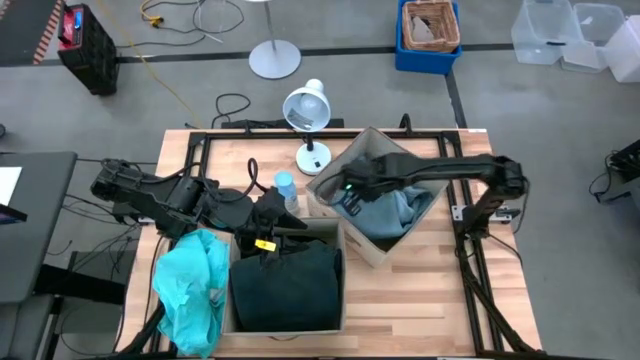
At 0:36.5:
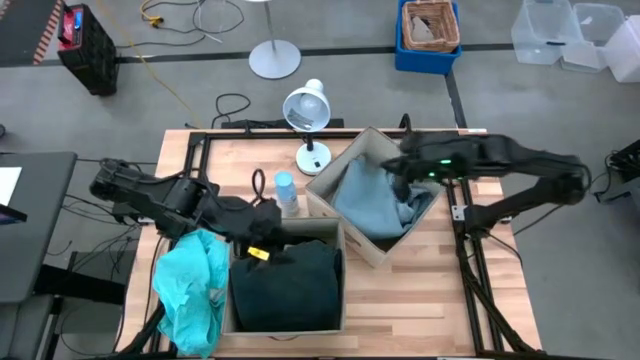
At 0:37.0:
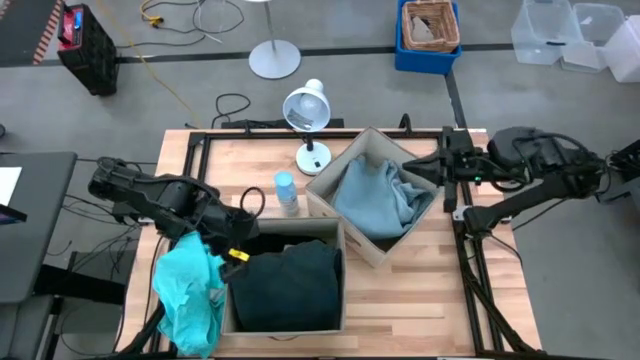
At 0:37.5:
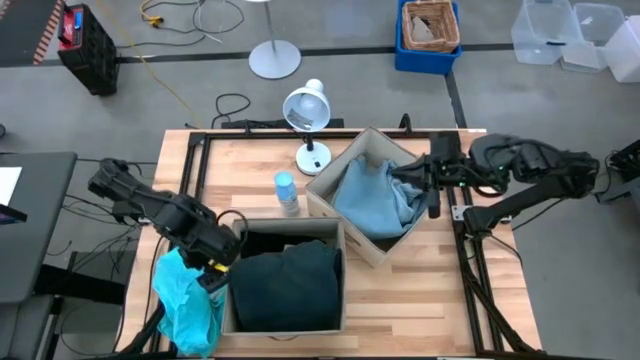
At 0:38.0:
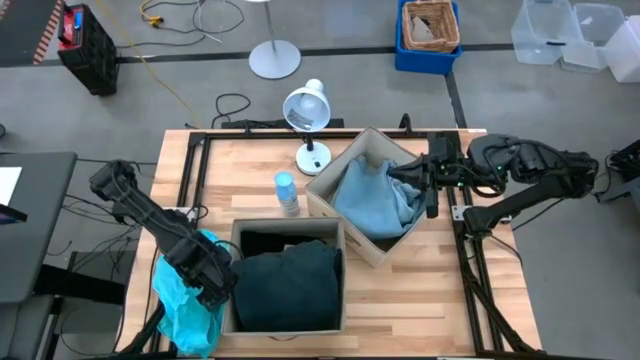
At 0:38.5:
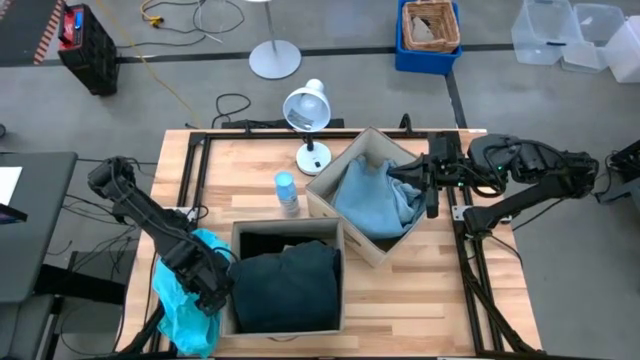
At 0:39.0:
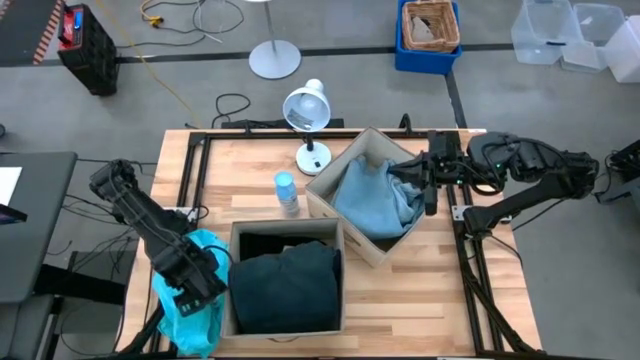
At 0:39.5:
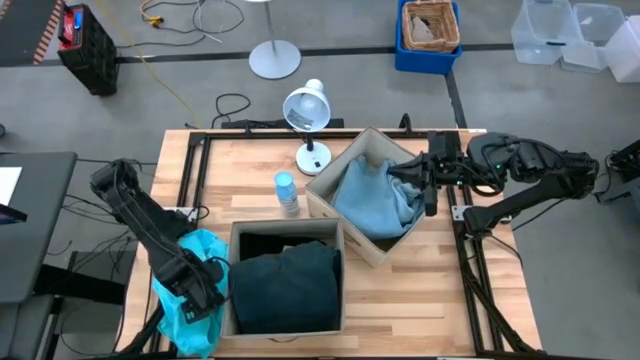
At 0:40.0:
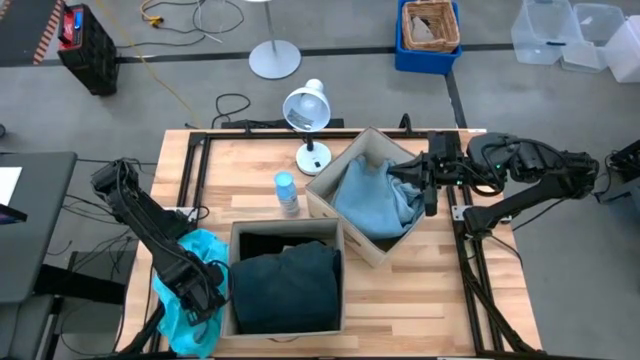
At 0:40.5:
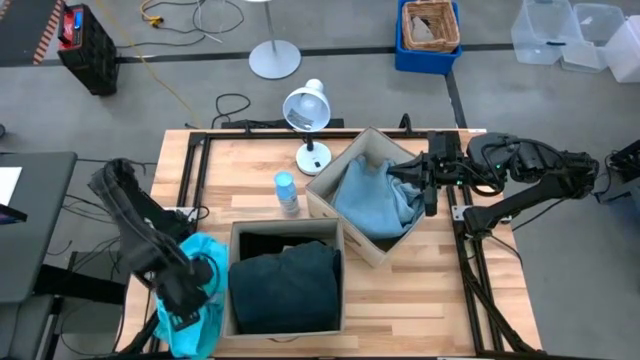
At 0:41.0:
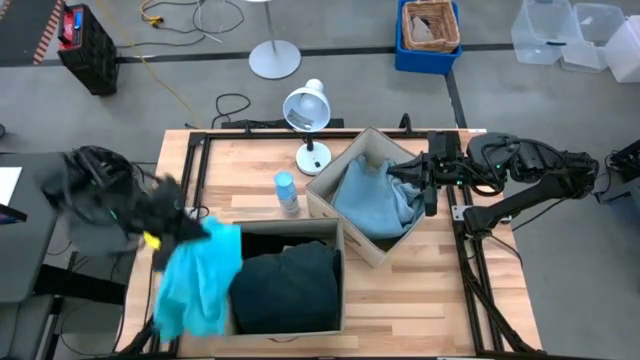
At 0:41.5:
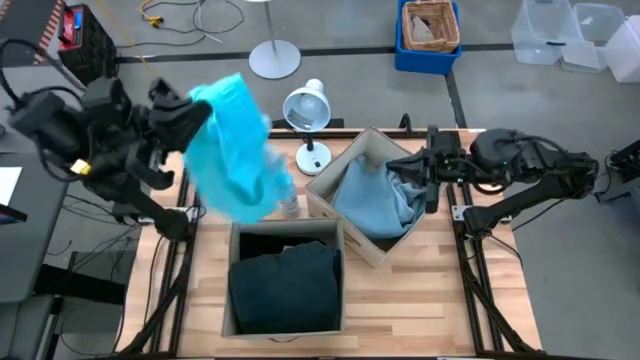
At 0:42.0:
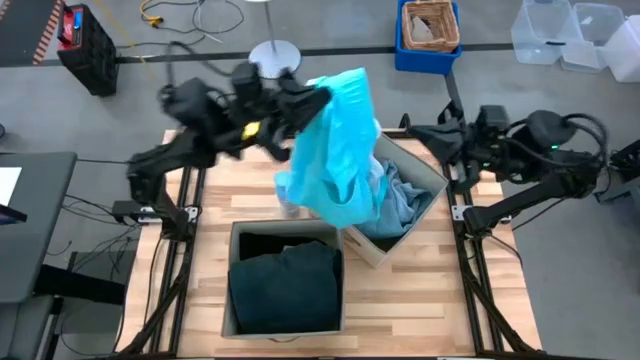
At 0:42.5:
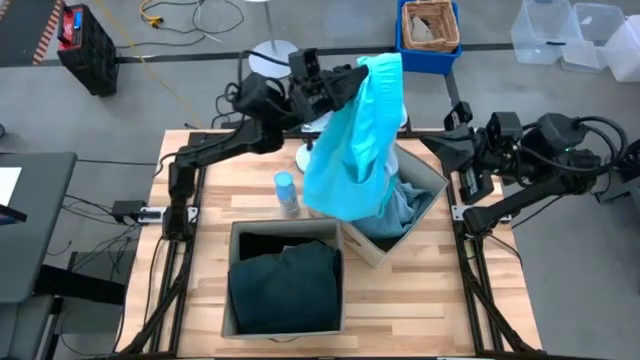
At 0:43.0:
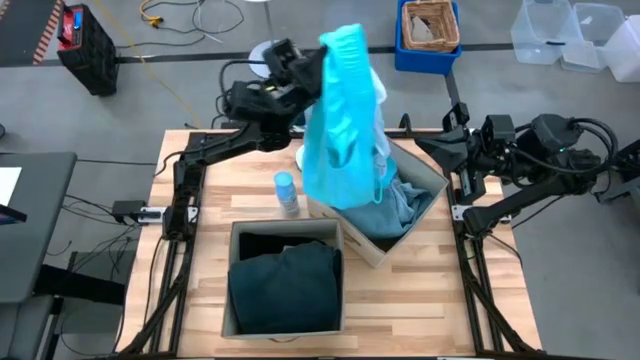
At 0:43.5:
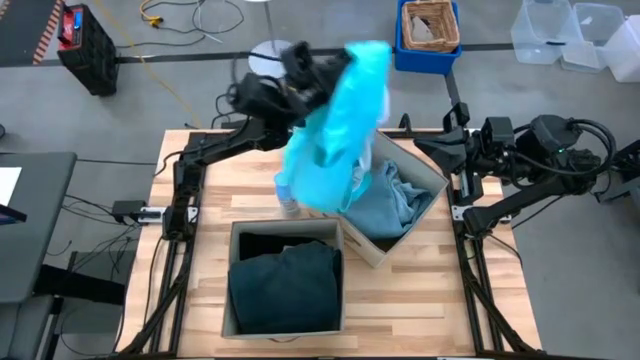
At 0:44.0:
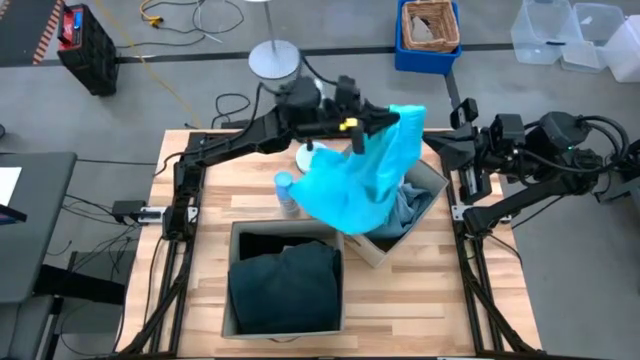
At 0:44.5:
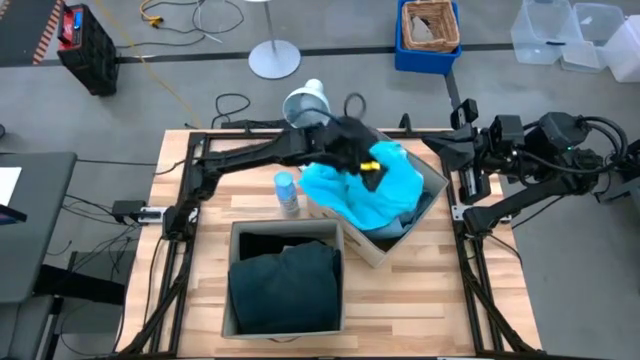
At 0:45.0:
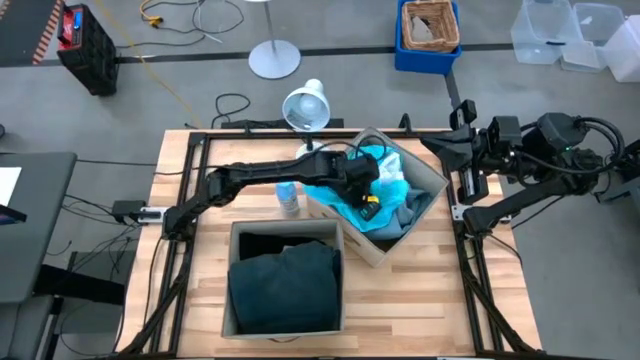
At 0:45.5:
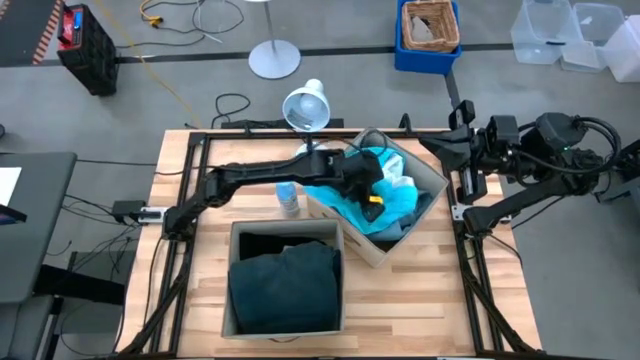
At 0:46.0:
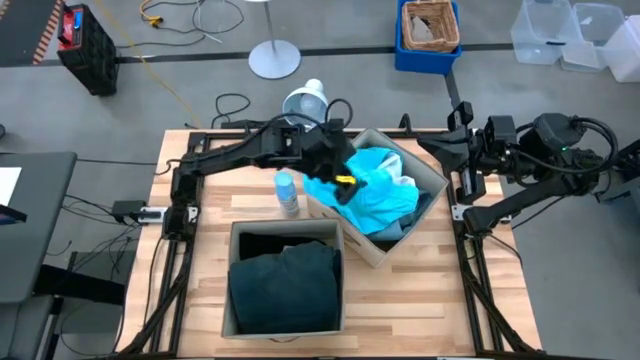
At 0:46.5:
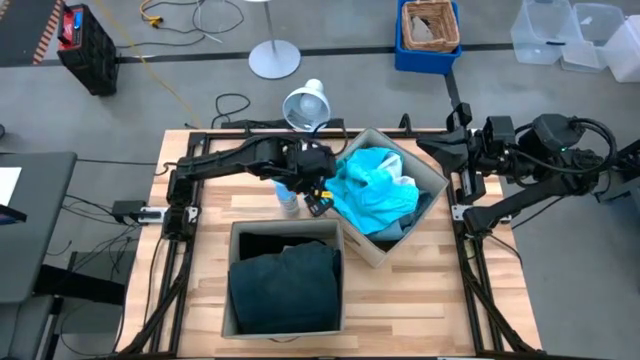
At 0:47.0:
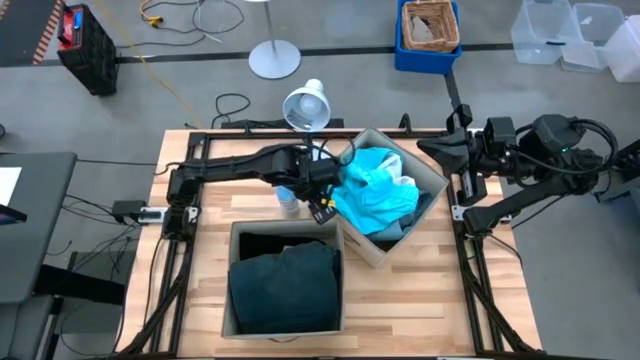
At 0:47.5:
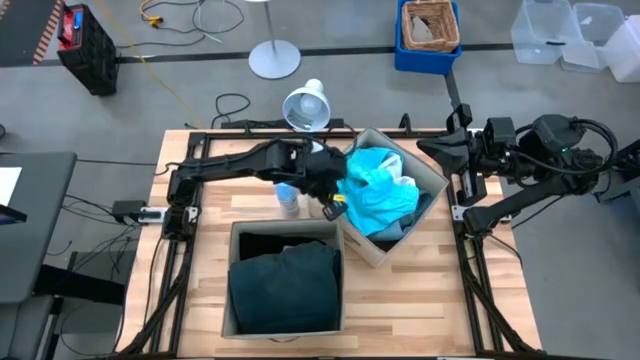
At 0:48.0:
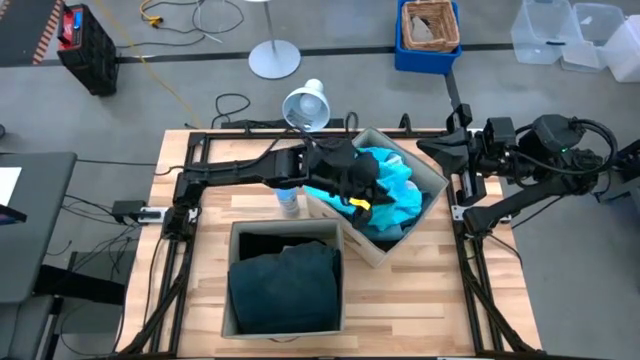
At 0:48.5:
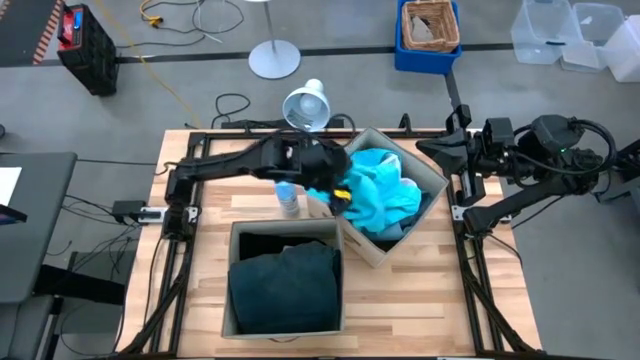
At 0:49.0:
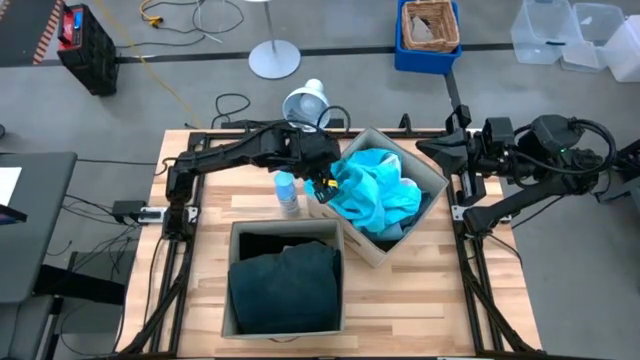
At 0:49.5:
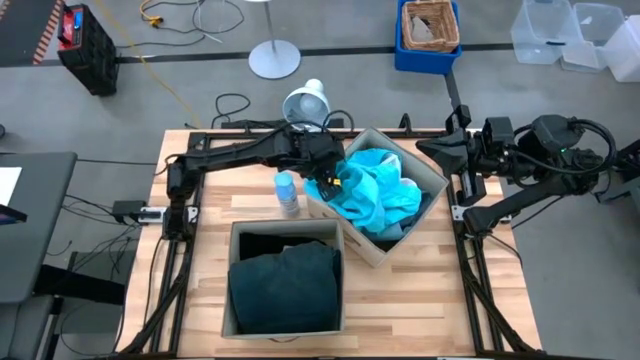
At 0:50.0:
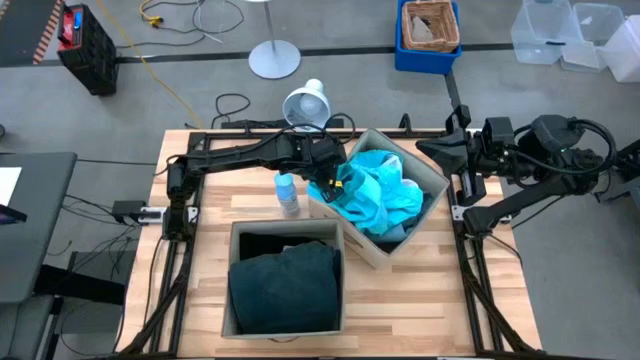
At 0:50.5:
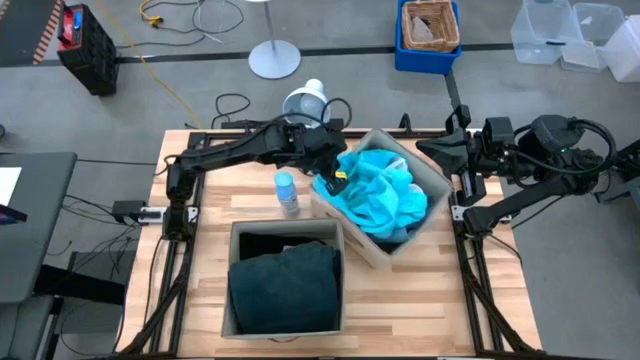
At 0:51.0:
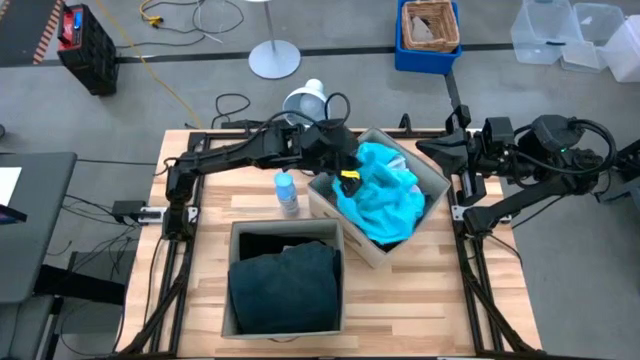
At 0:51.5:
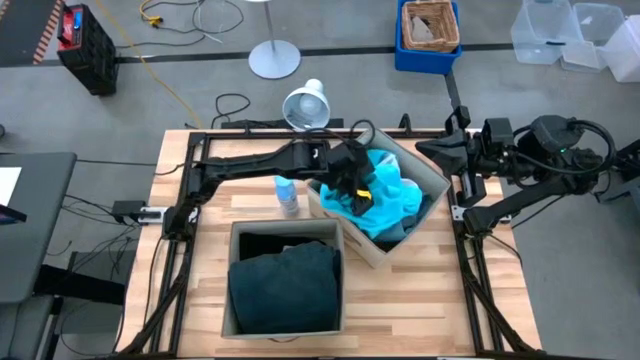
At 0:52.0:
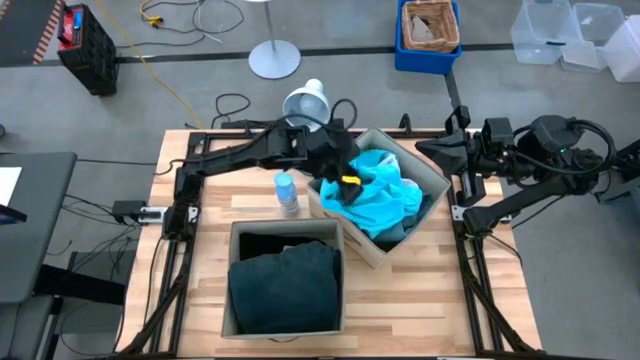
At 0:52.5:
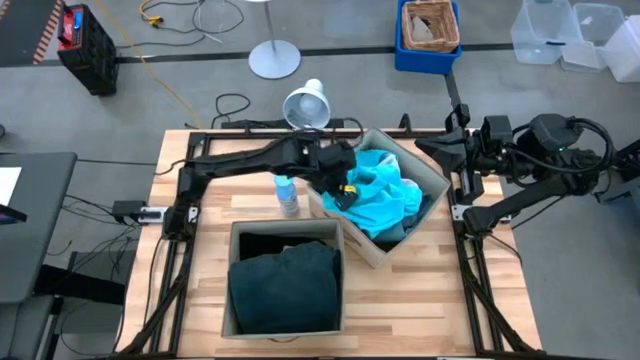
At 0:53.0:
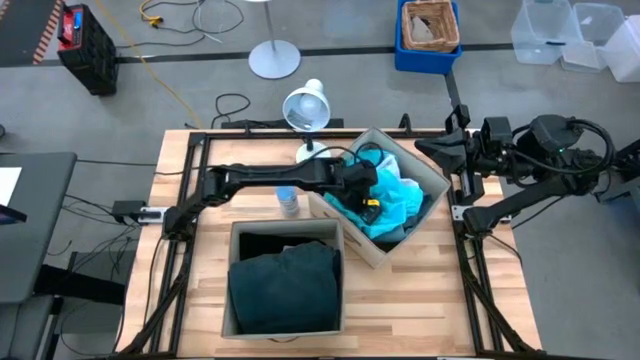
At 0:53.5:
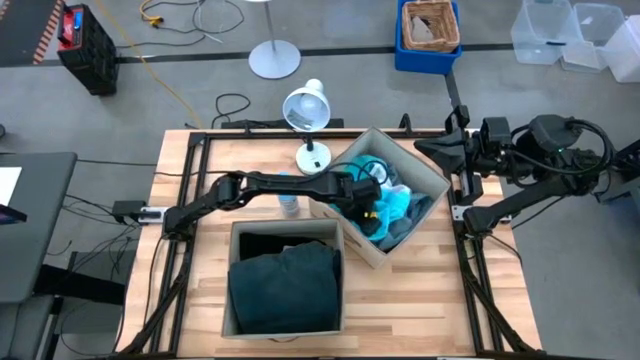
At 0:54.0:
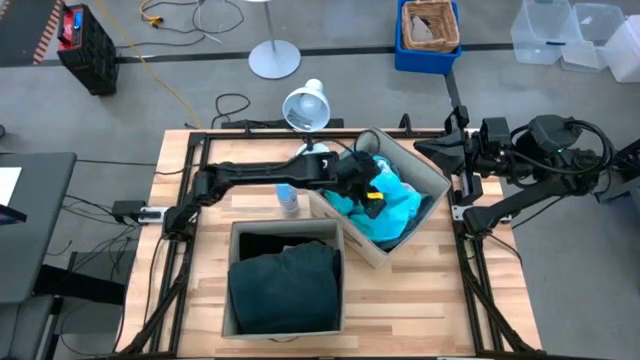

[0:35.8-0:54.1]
Task: Sort clothes
Put the blue shorts into the top laundry bin

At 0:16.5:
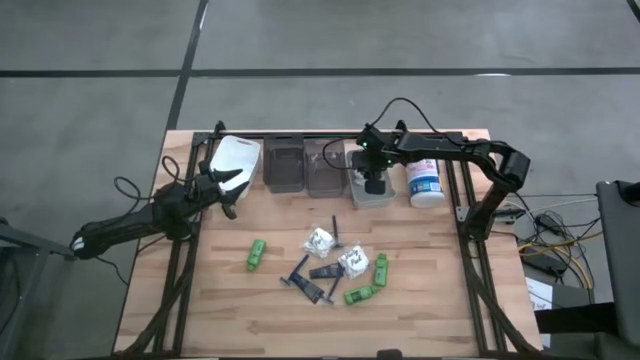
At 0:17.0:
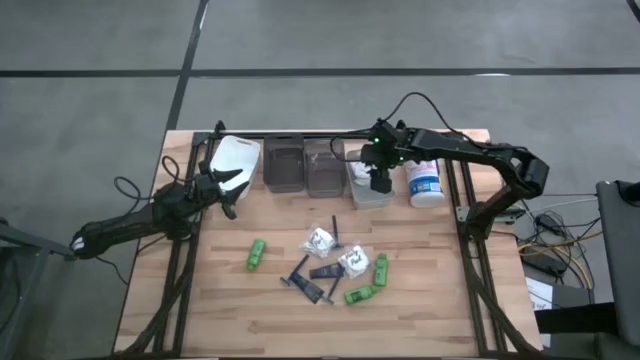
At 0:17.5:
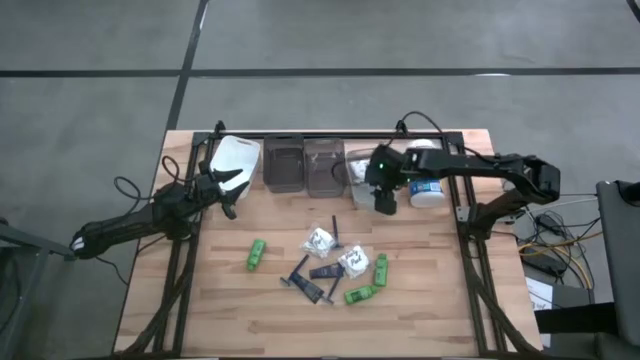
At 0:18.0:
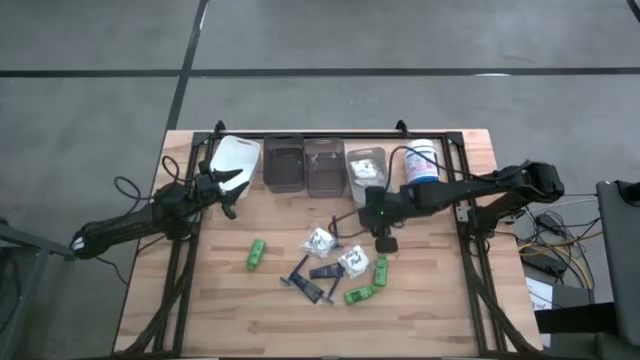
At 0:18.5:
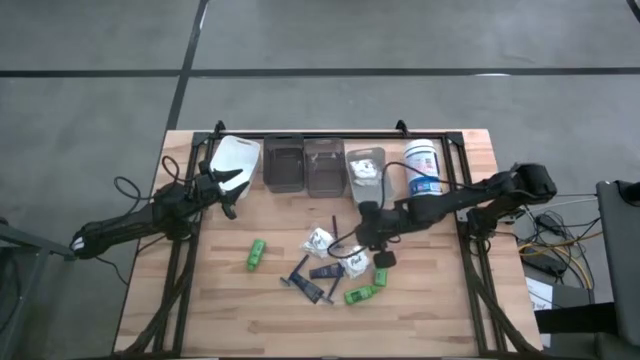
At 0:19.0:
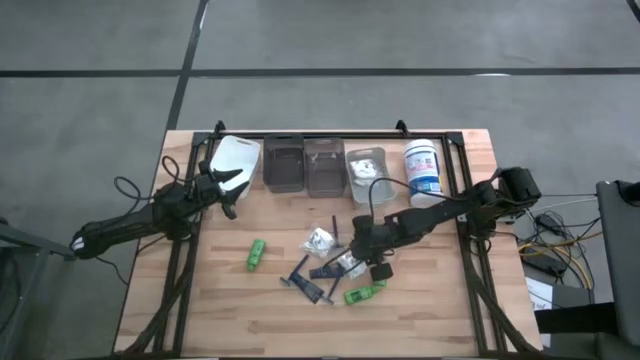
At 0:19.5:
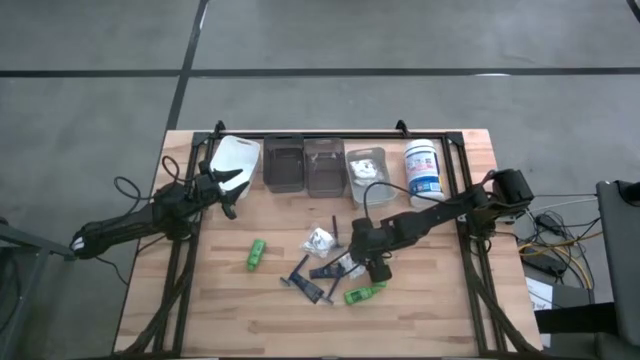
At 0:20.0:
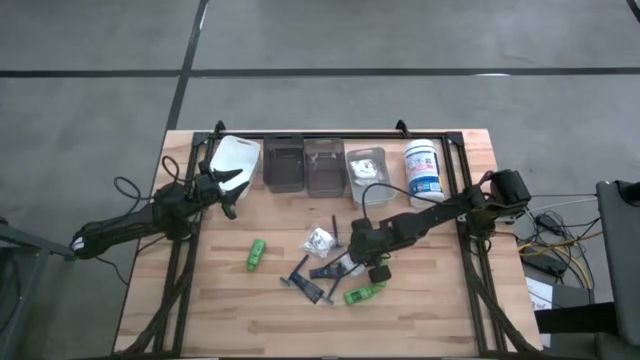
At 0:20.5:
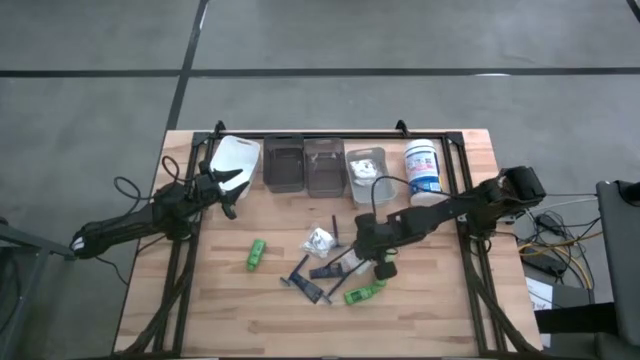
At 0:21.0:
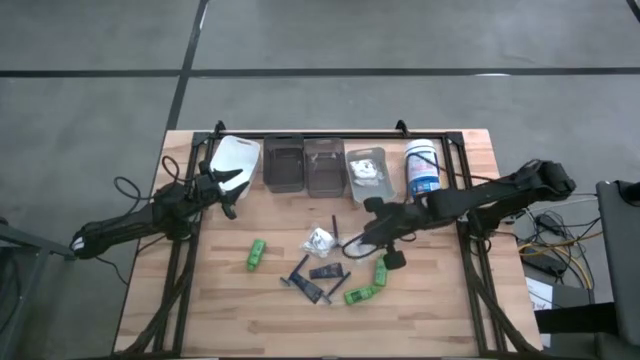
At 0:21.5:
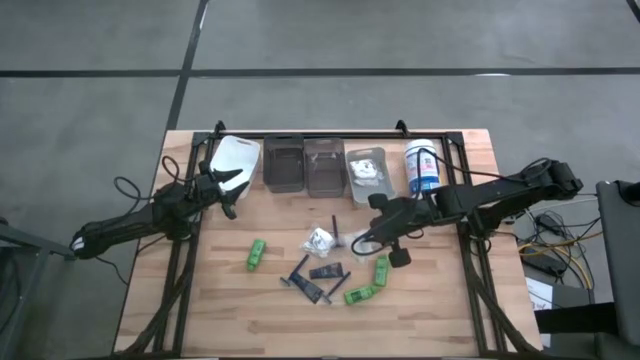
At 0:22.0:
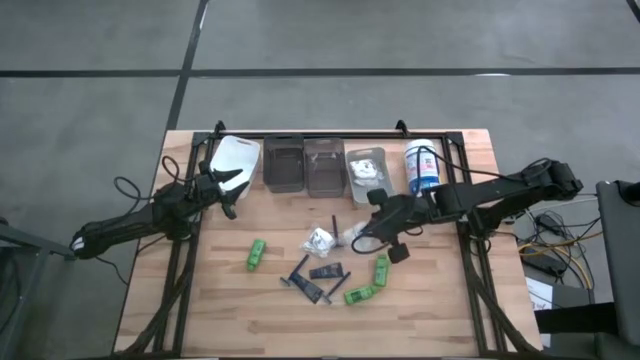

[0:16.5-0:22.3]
Task: Pick & Place Travel size toiletries
Put the bottom cotton pack into the grey bin
